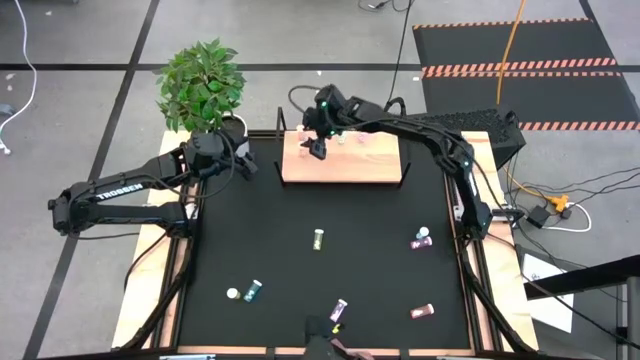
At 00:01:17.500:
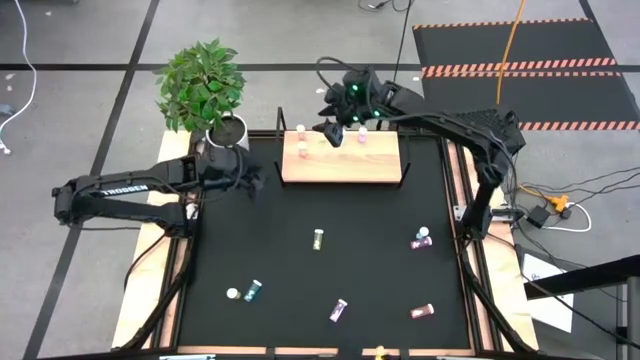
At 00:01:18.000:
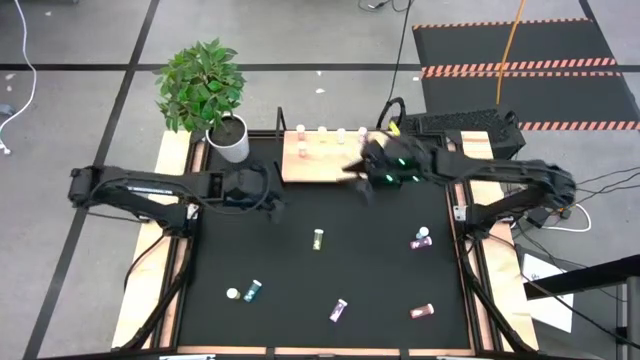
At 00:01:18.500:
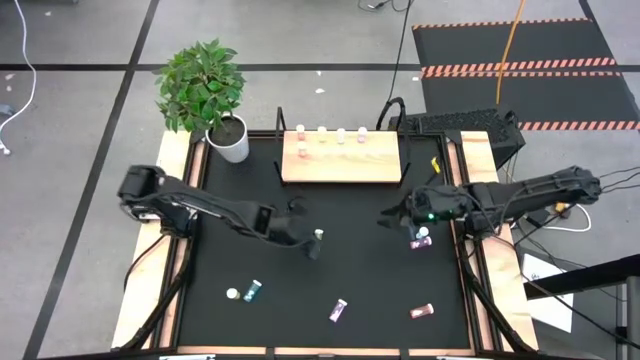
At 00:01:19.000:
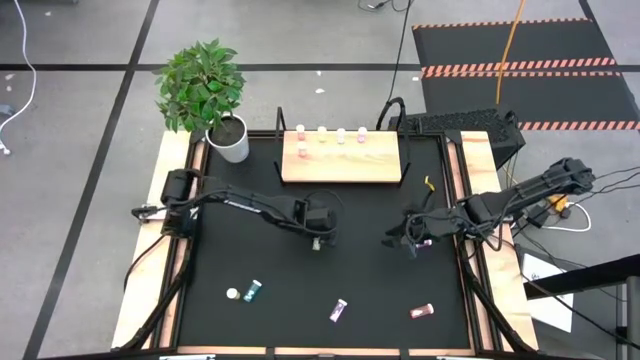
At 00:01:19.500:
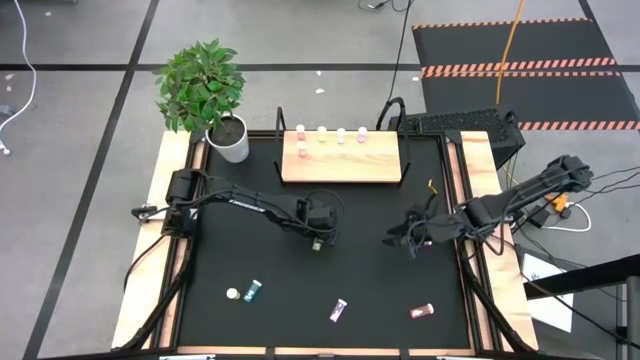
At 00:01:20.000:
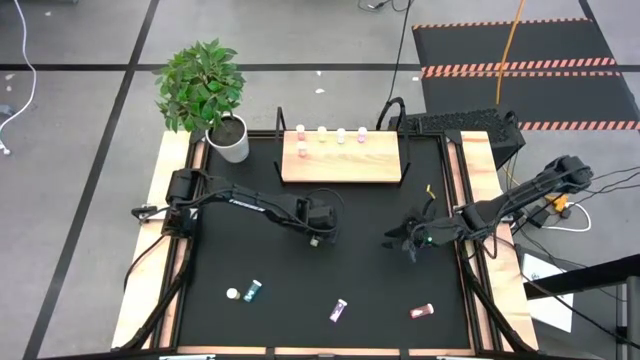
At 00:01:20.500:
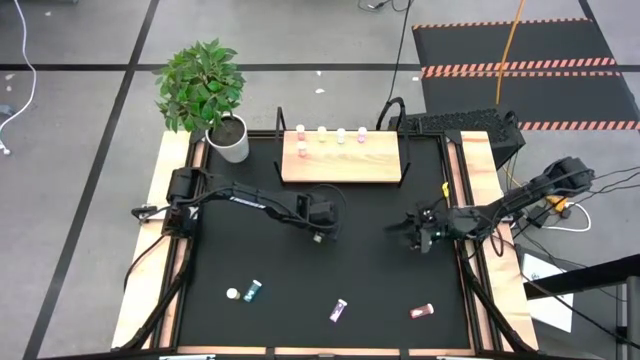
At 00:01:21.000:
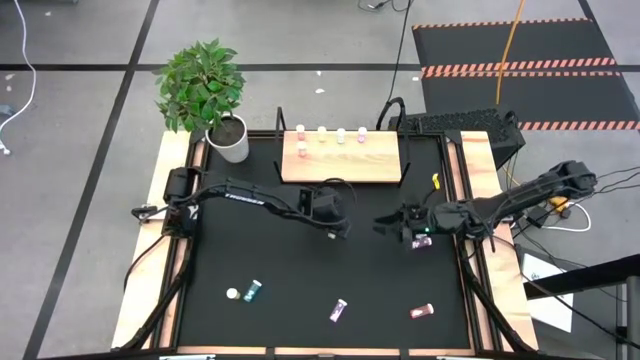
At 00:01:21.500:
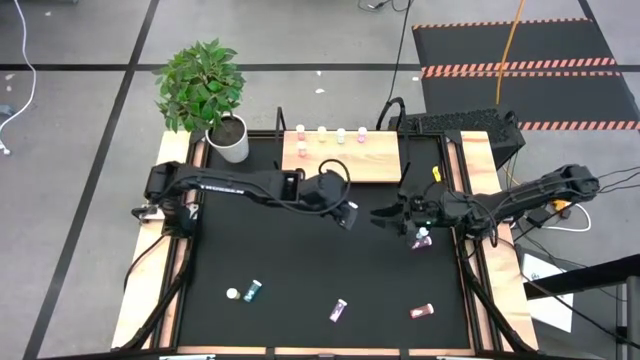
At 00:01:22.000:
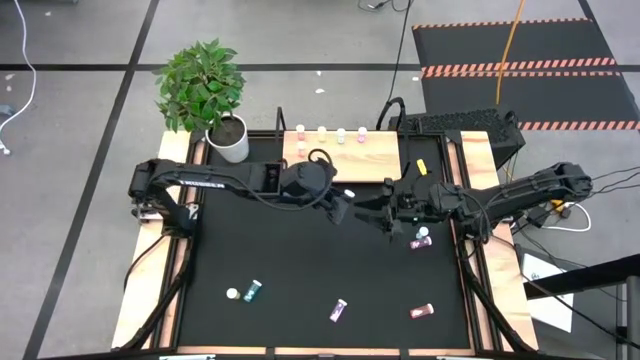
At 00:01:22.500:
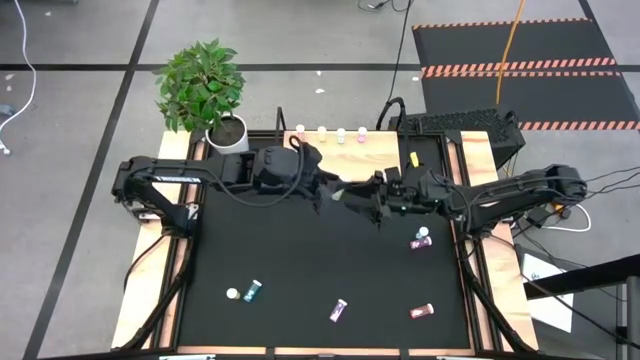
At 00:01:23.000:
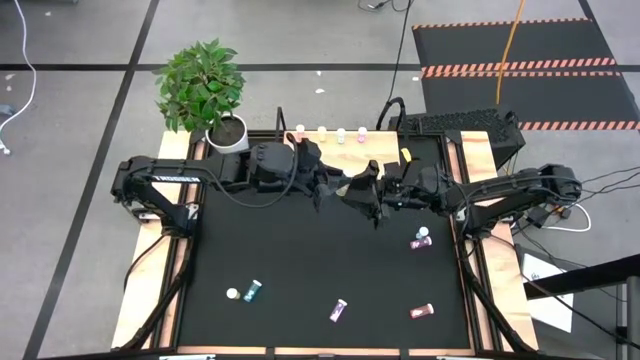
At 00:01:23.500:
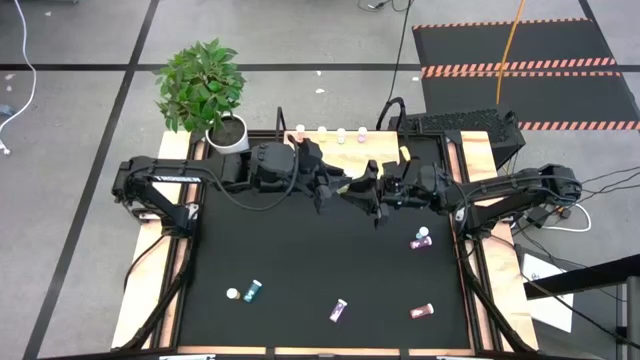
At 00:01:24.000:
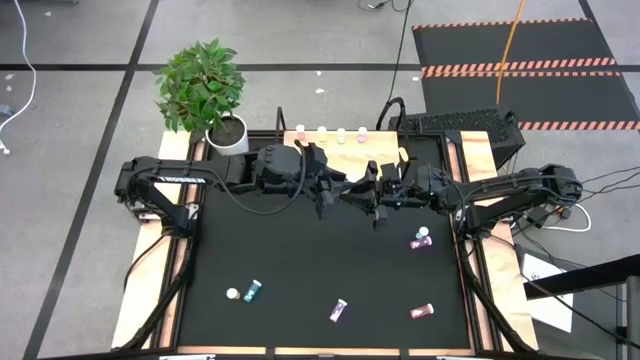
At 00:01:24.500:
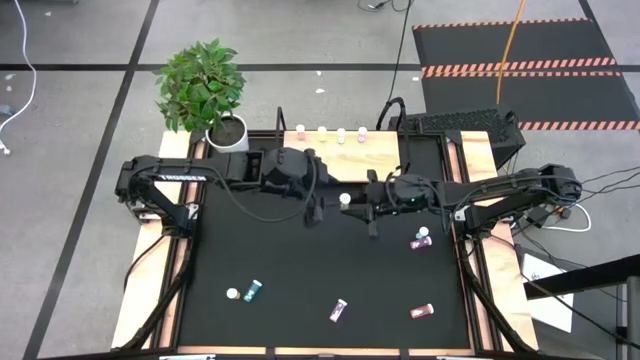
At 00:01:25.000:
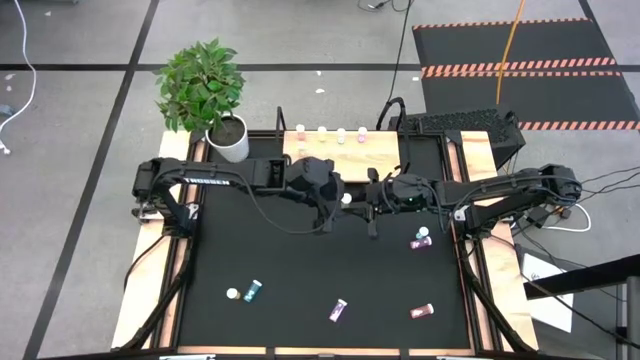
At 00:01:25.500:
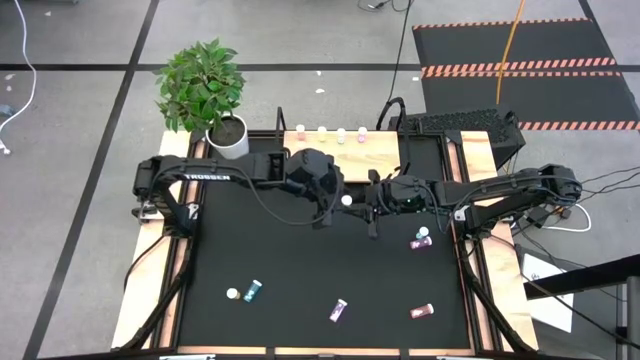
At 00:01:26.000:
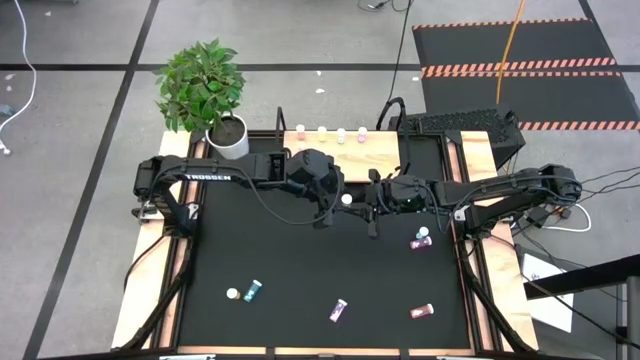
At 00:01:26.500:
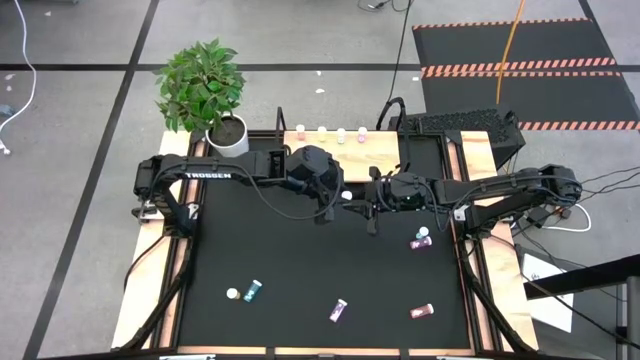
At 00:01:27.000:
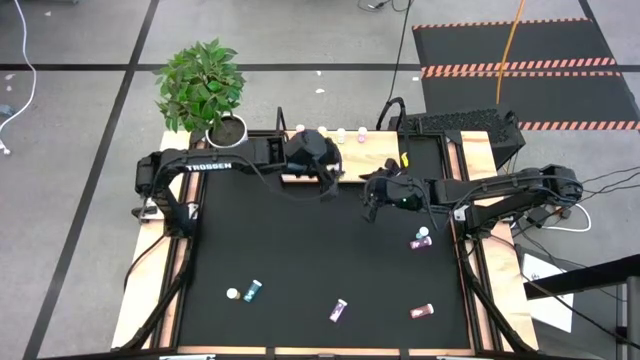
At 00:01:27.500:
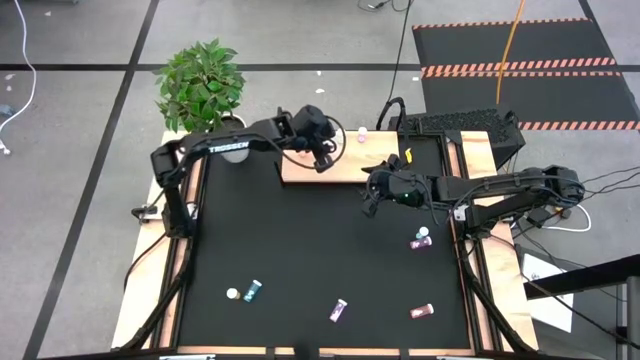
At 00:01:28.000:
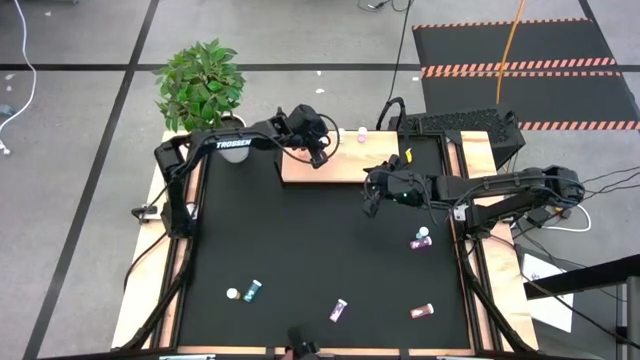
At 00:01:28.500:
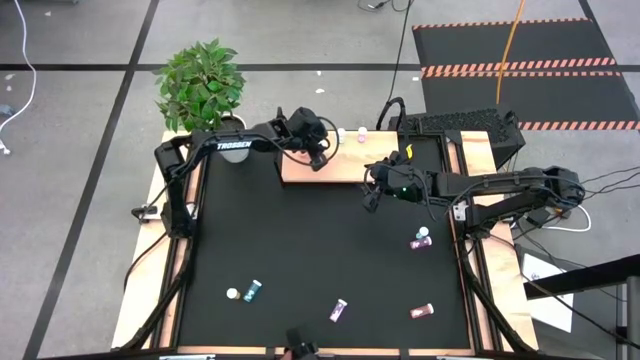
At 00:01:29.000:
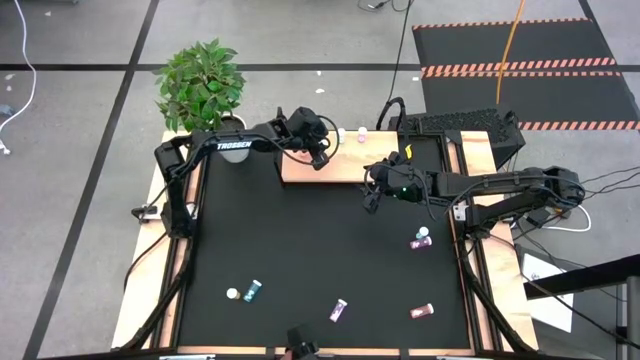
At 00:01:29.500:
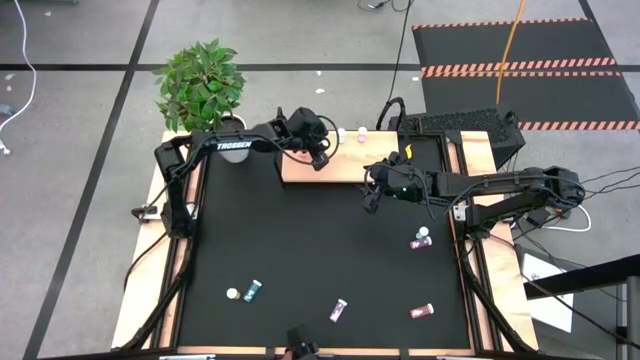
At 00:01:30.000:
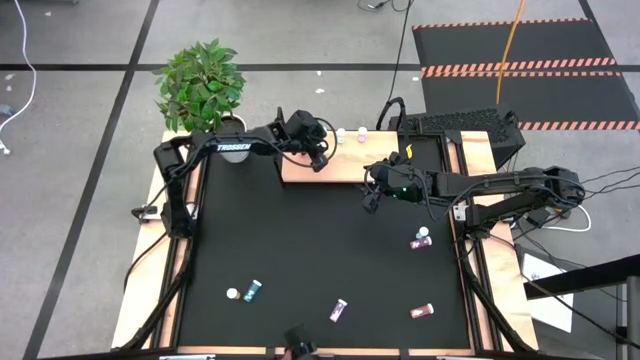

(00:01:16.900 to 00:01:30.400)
Task: Pick and place medicine bottles onto shelf by color
Put the right yellow pill bottle on the shelf aligned with the other yellow pill bottle

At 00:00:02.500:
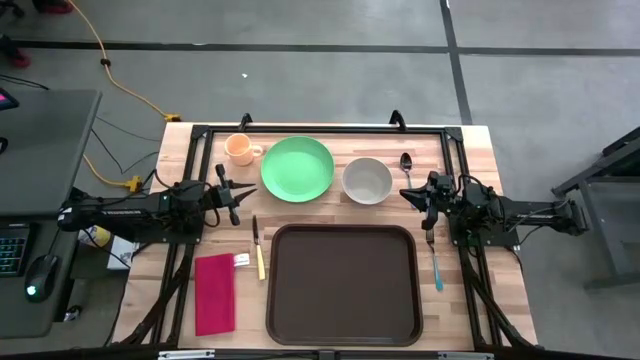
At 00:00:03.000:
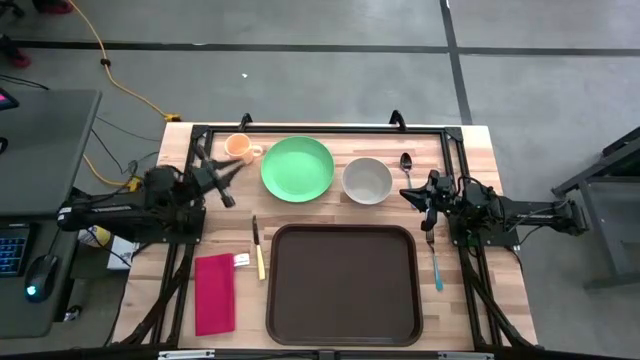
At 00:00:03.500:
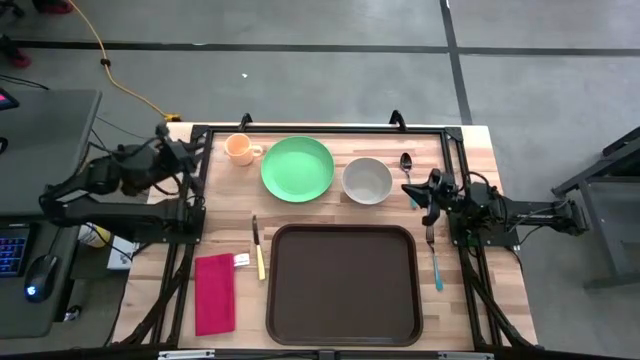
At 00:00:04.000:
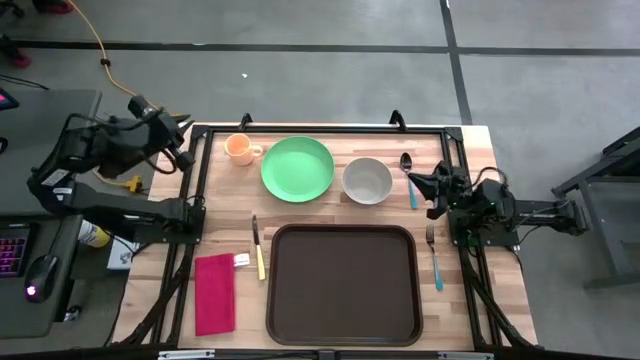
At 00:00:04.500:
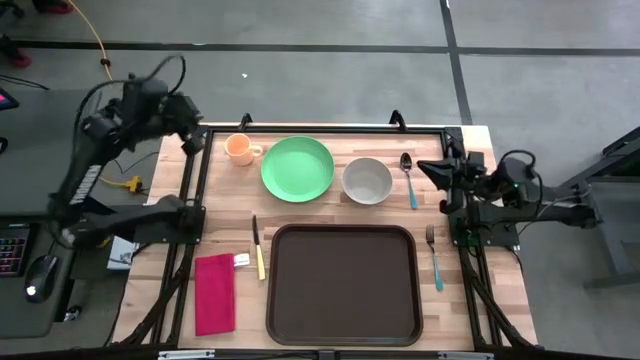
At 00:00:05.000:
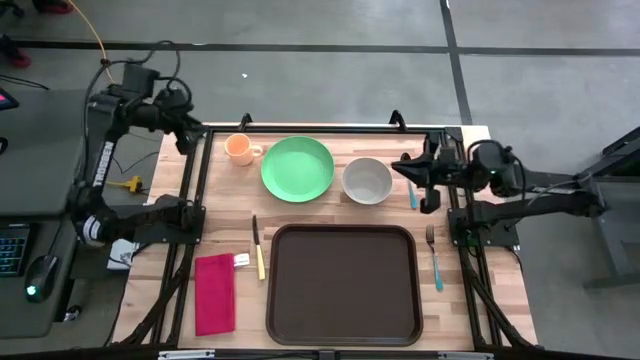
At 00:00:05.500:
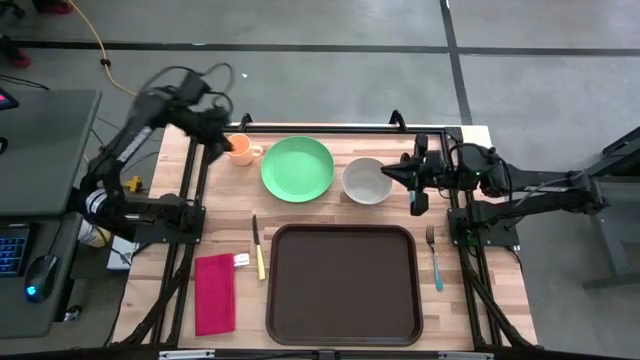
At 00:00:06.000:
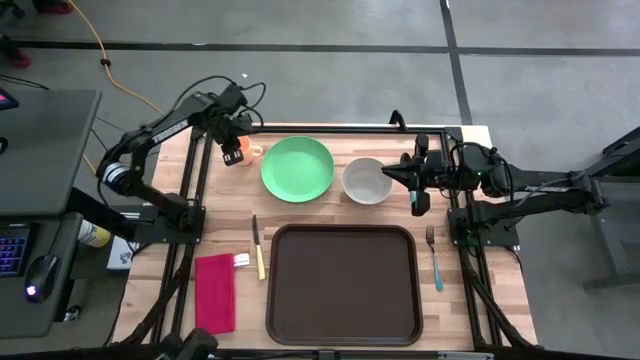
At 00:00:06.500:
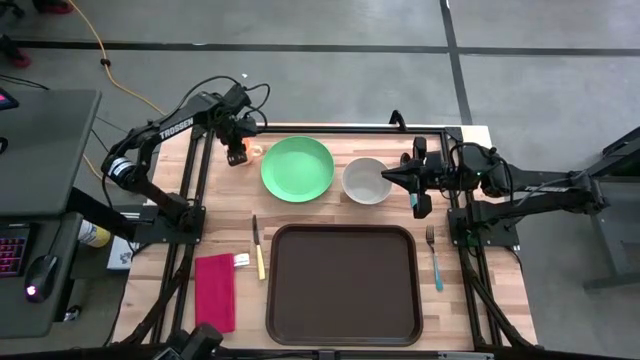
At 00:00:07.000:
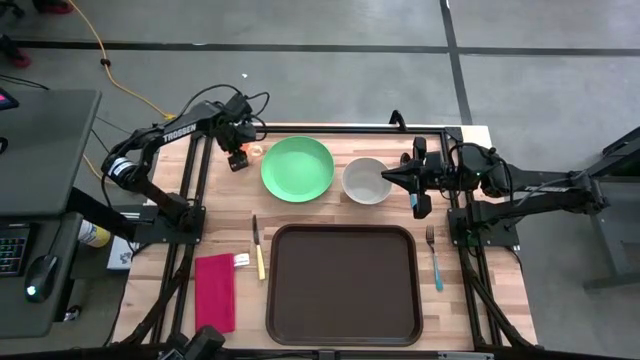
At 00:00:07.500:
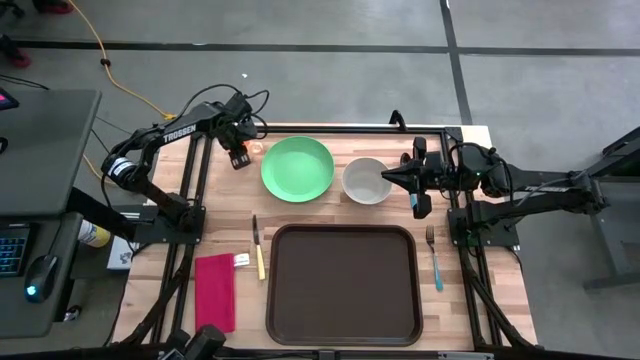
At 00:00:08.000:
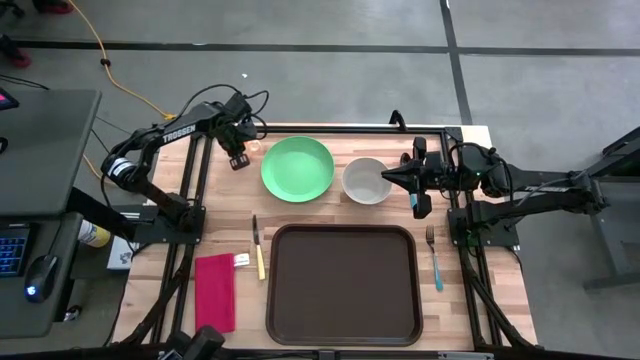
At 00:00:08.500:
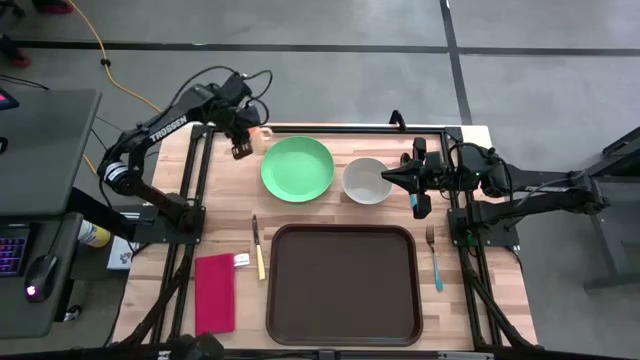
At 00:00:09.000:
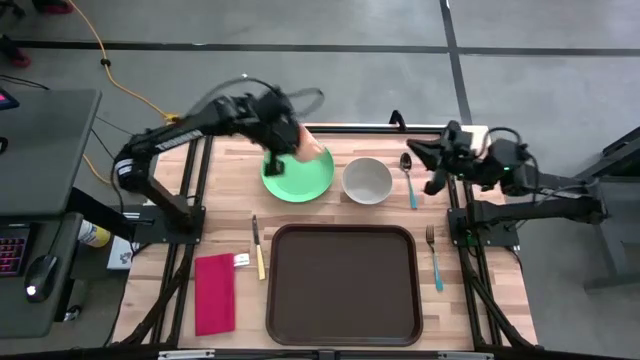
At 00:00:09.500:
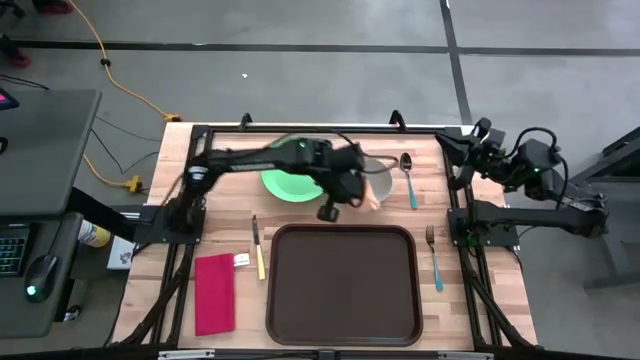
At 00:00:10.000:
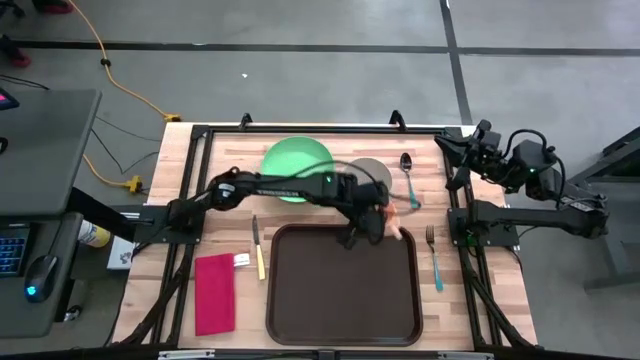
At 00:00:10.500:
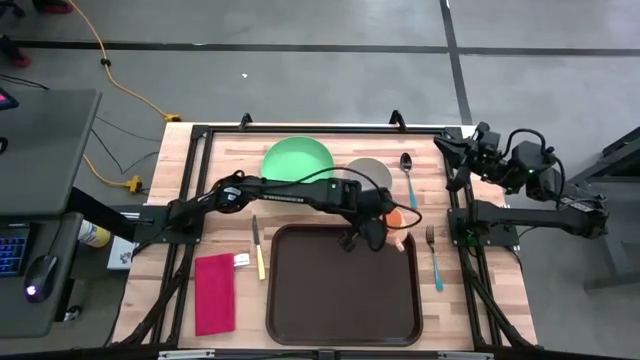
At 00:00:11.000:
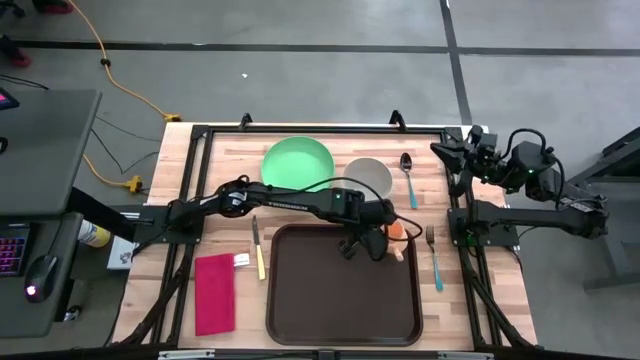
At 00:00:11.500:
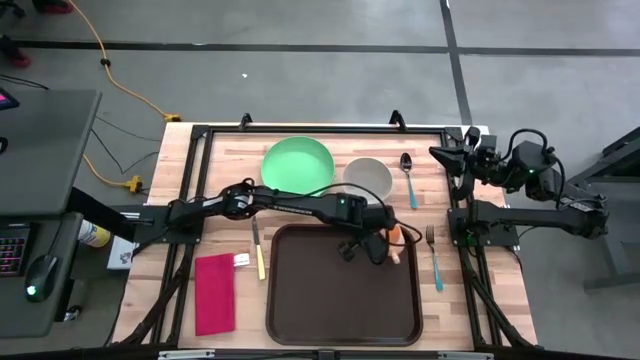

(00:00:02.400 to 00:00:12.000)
Task: Set up tray
Put the orange mug on the black serving tray
